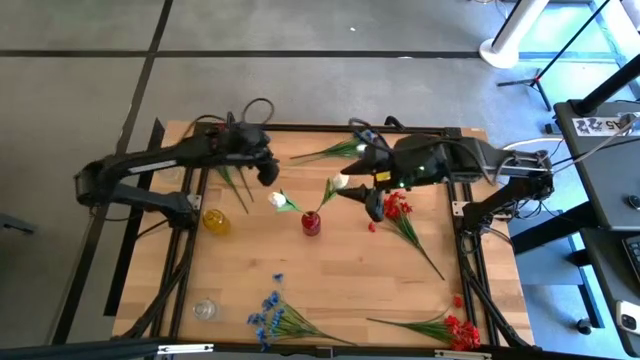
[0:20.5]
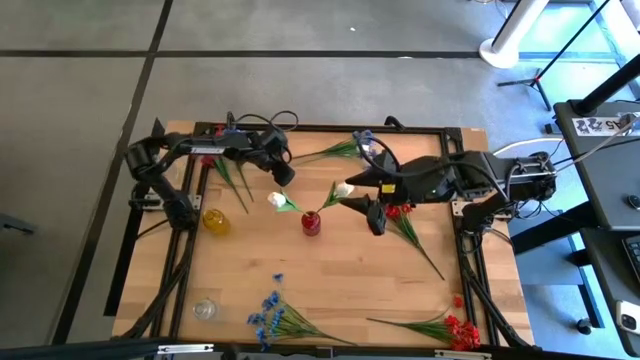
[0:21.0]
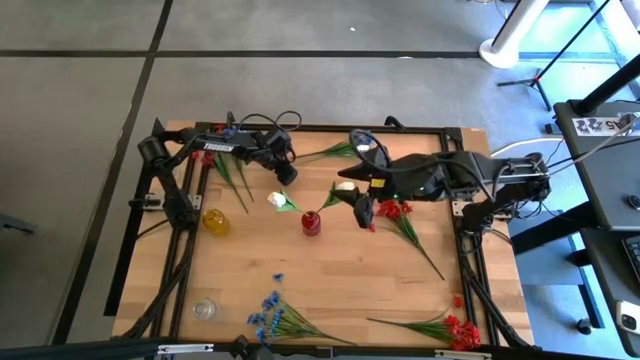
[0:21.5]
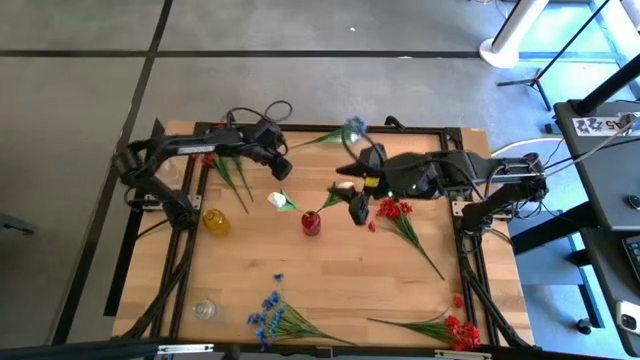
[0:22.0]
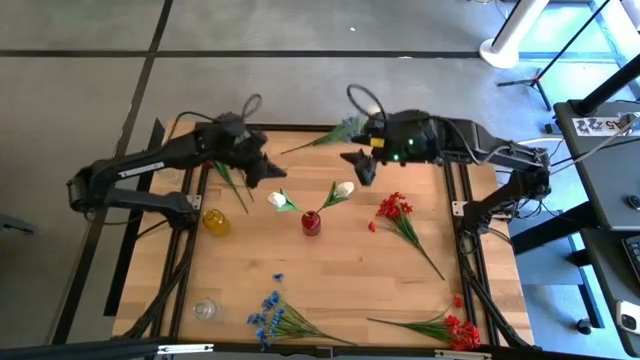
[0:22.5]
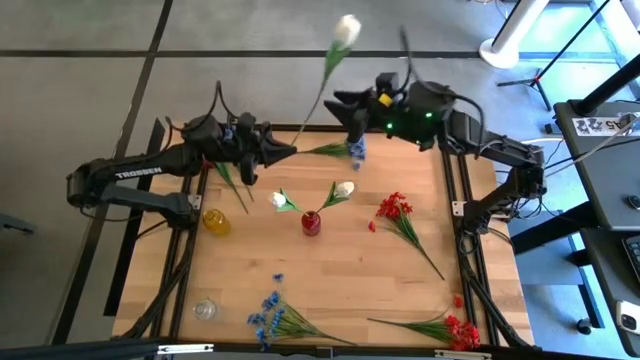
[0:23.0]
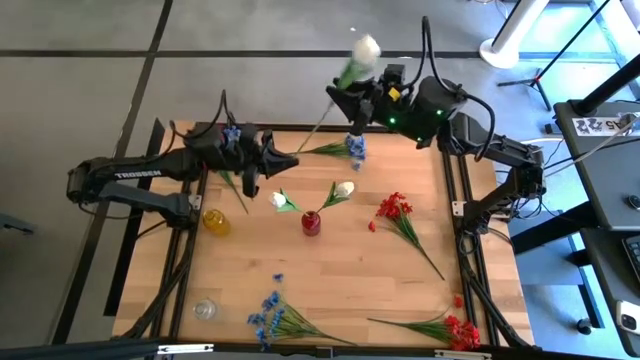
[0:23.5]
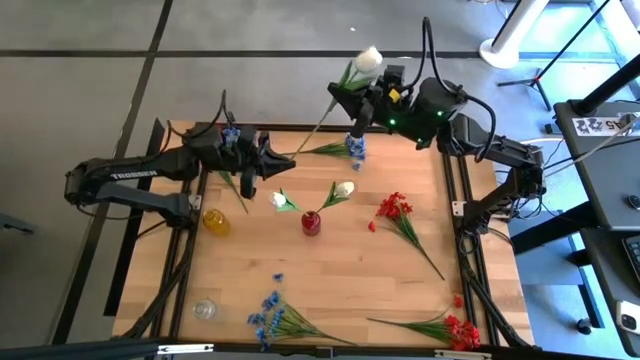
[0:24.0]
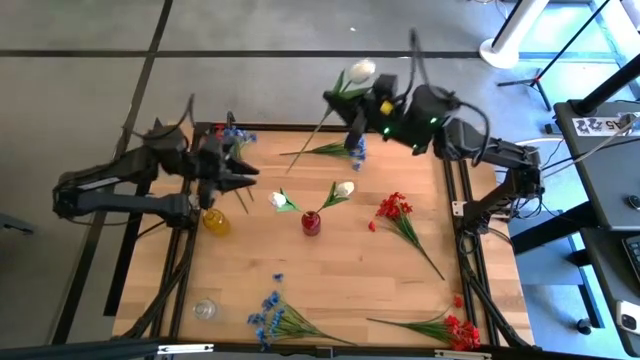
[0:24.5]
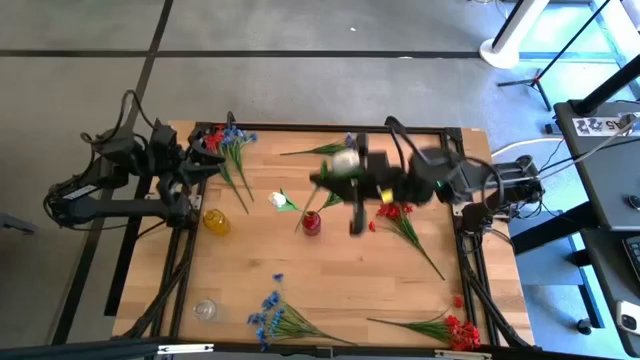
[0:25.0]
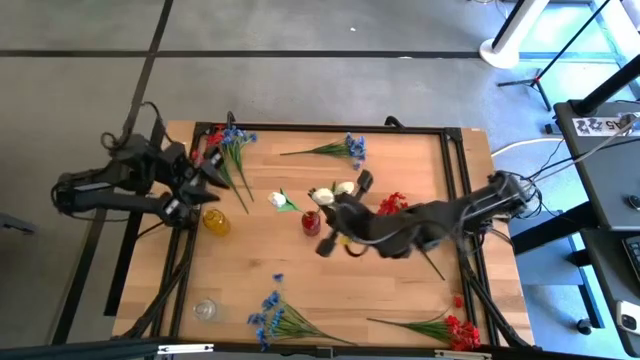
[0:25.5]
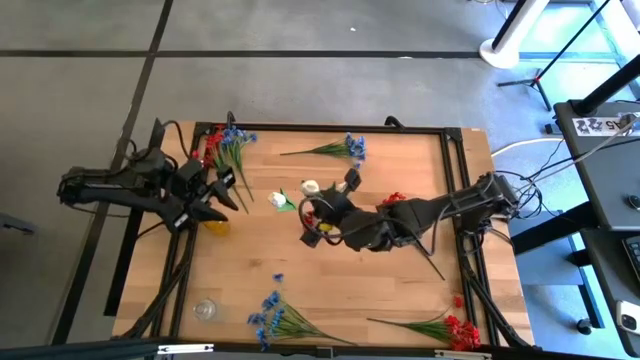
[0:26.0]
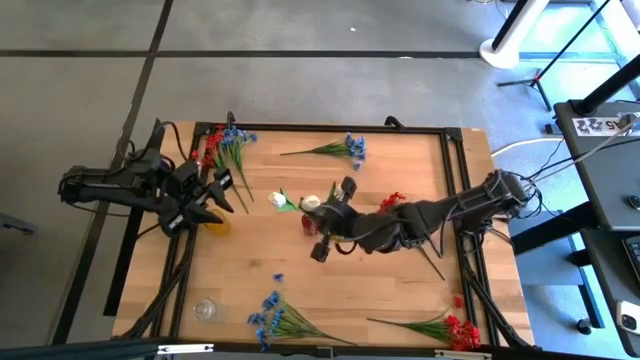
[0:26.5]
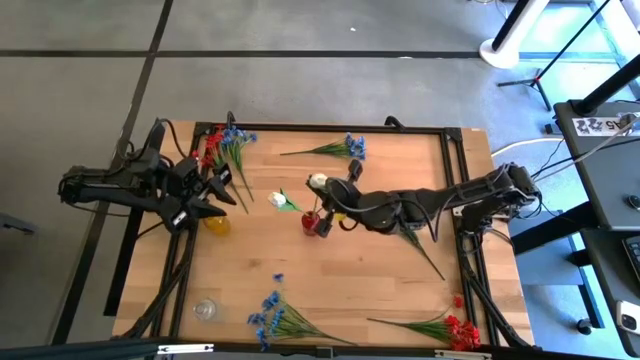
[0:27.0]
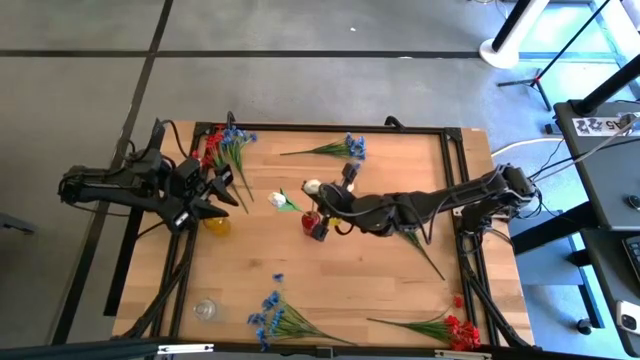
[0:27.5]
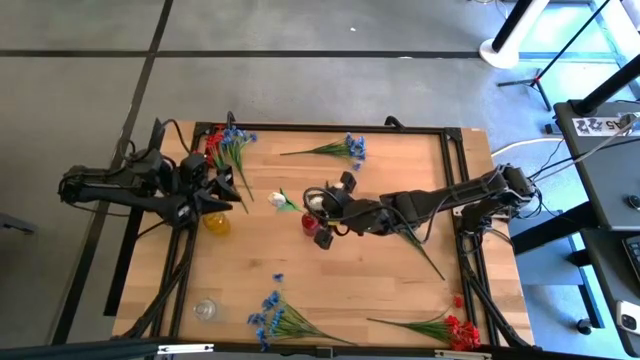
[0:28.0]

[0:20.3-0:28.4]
Task: Sort flowers into vase by color
Put the white flower into the red vase

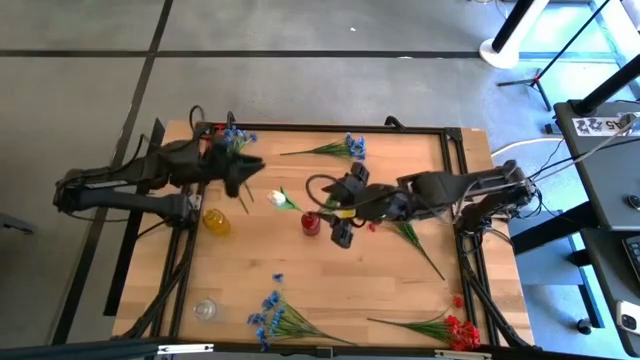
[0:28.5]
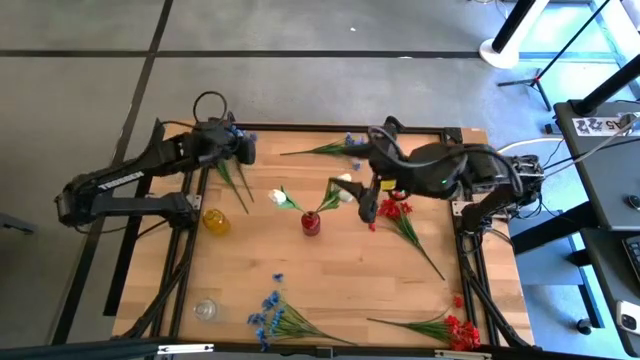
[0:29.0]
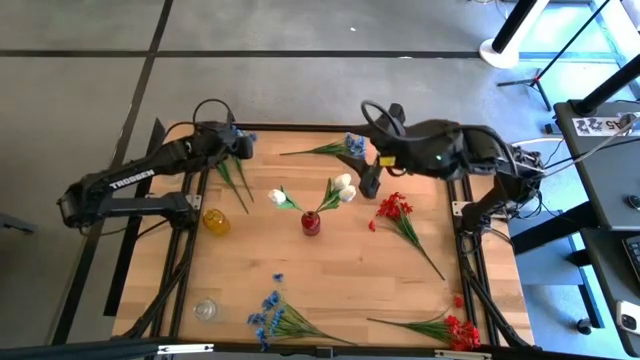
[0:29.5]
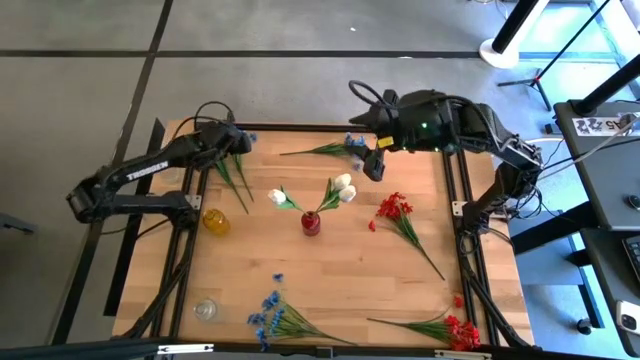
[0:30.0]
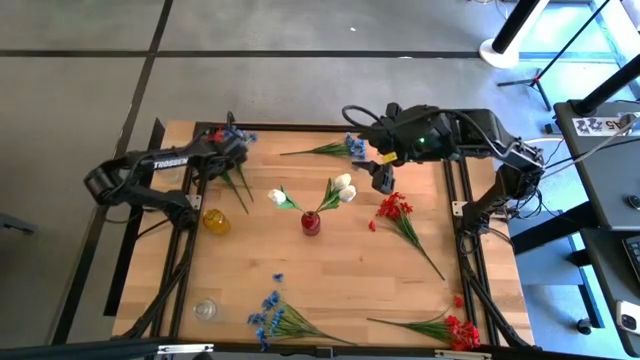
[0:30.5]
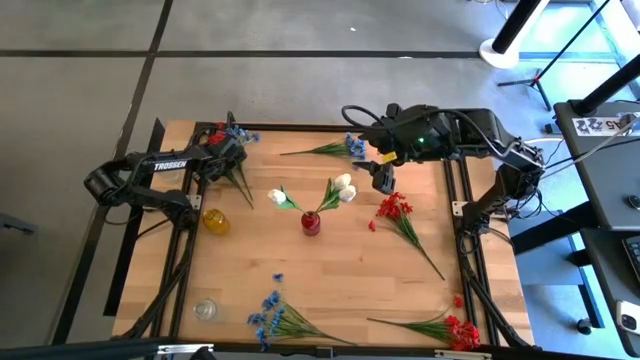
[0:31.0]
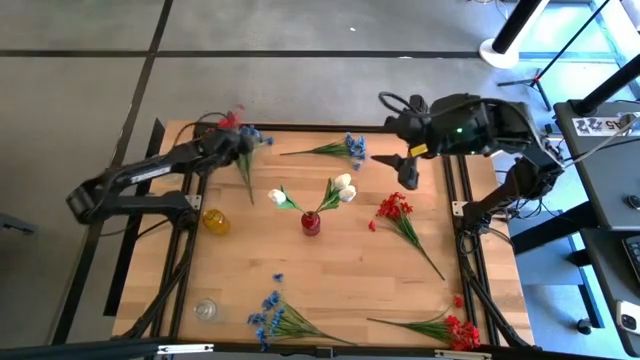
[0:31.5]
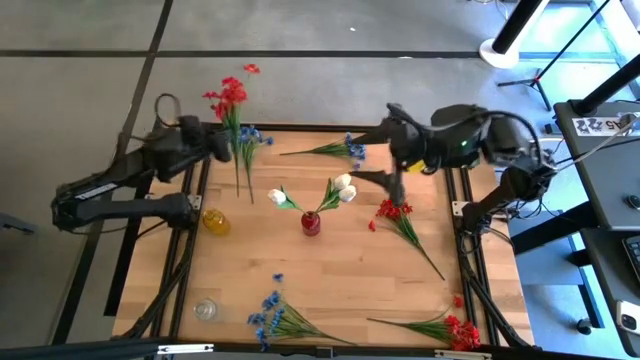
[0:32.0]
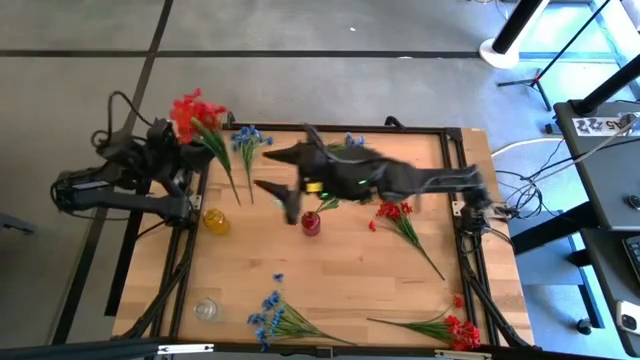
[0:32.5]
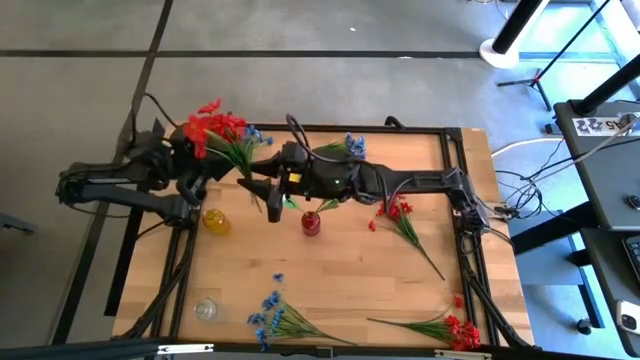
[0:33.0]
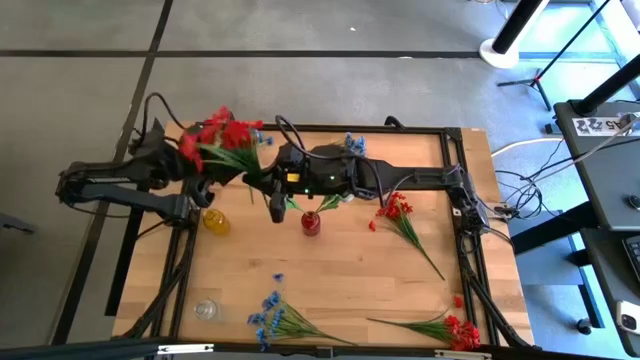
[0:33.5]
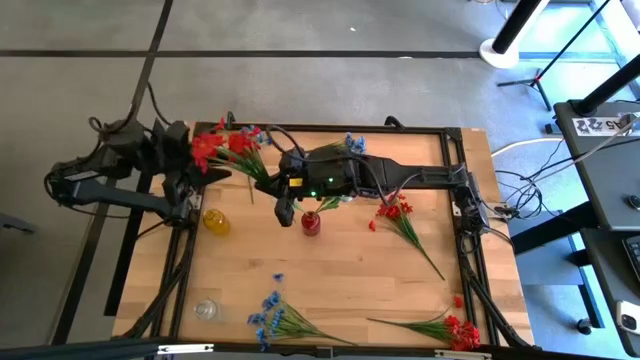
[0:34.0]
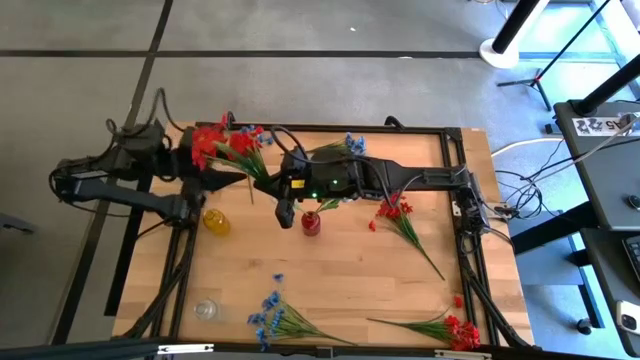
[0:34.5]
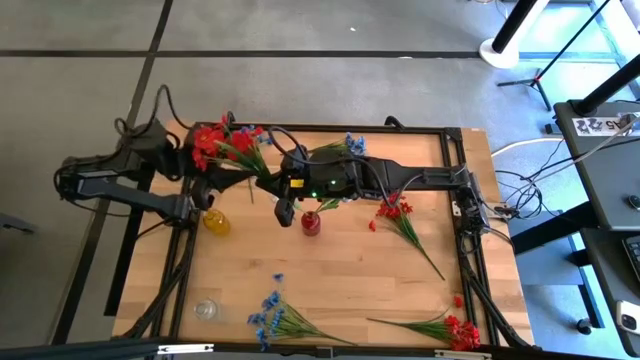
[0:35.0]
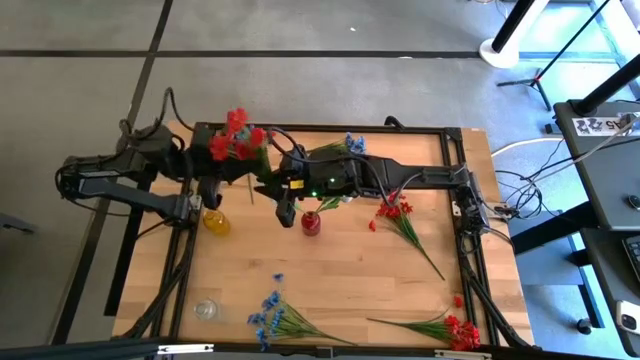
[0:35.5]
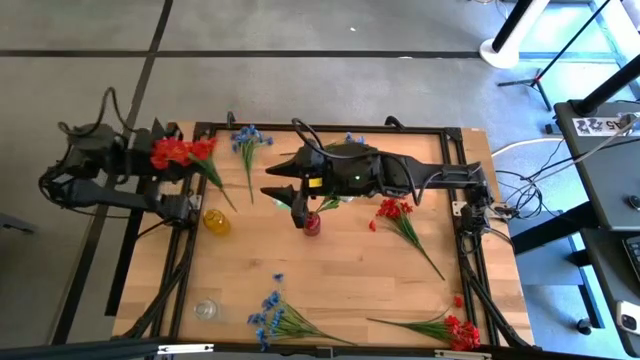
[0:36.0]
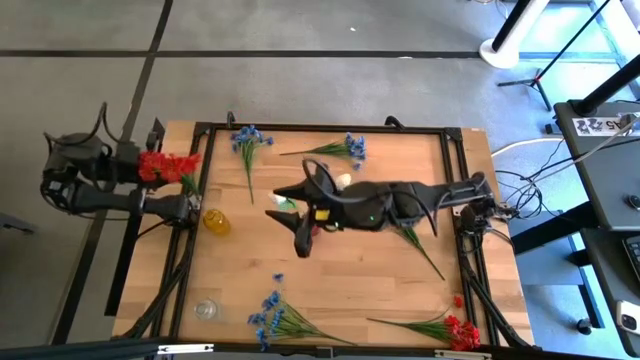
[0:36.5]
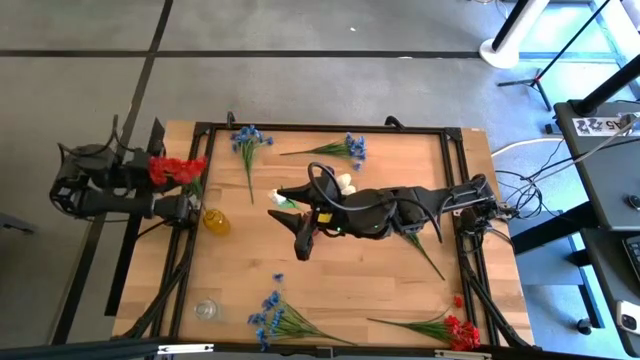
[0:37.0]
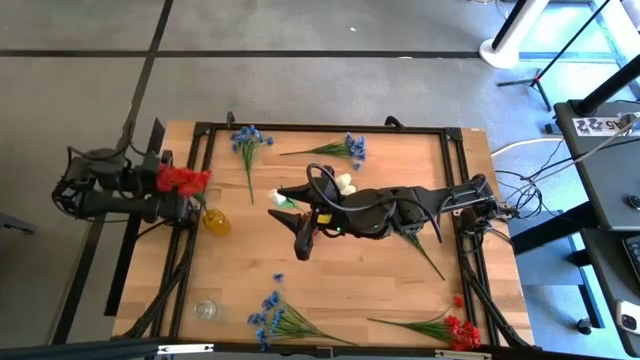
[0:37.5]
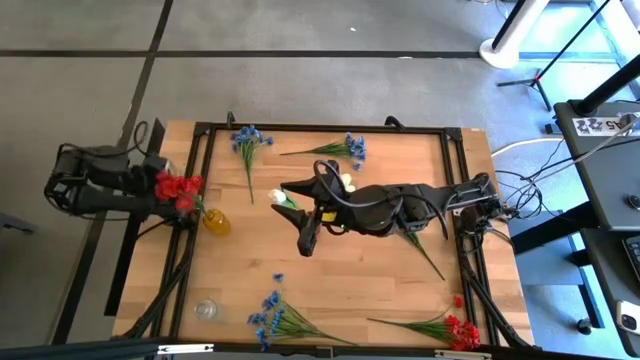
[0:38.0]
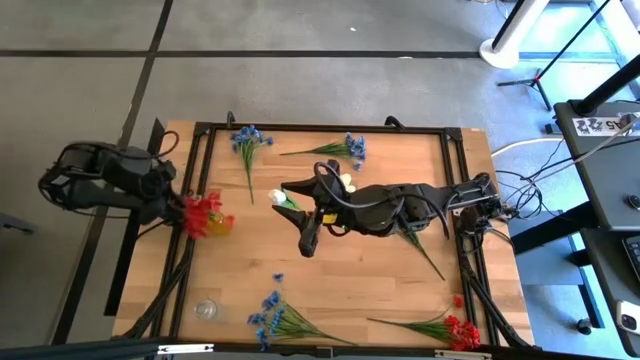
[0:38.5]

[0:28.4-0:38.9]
Put the top left red flowers into the yellow vase
